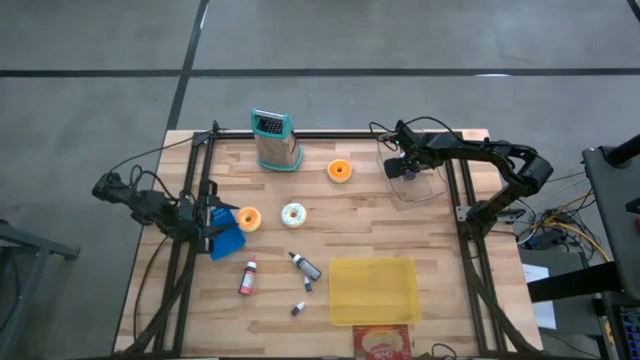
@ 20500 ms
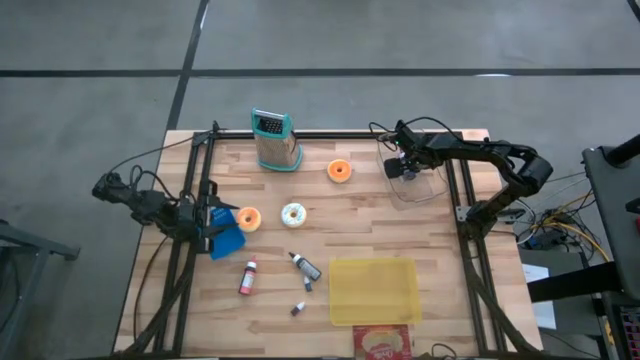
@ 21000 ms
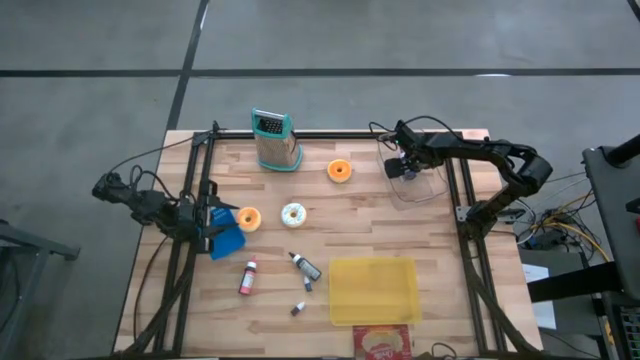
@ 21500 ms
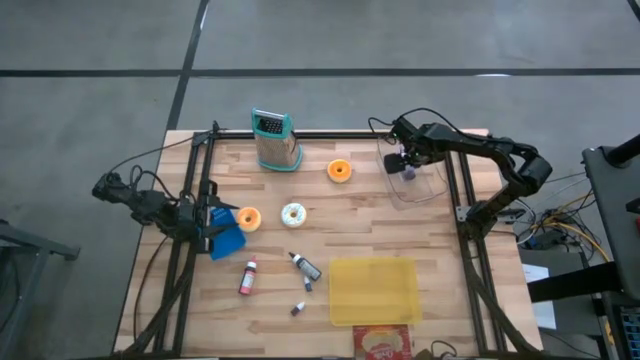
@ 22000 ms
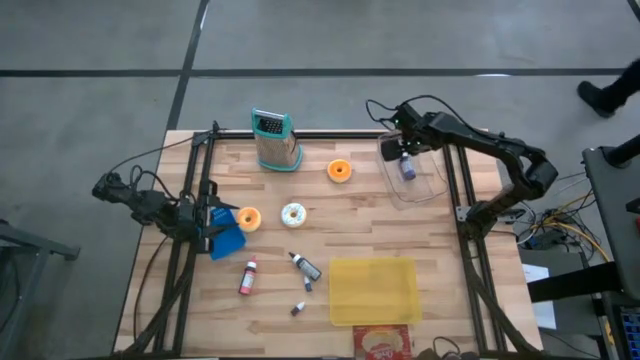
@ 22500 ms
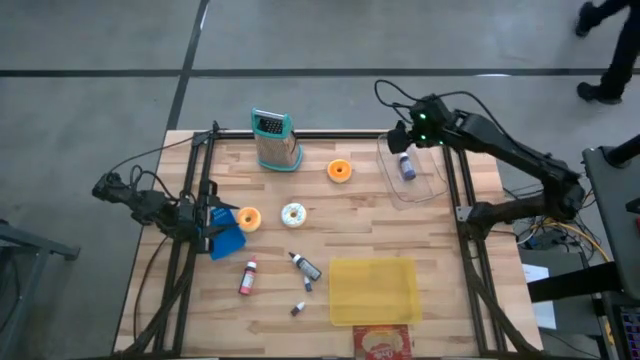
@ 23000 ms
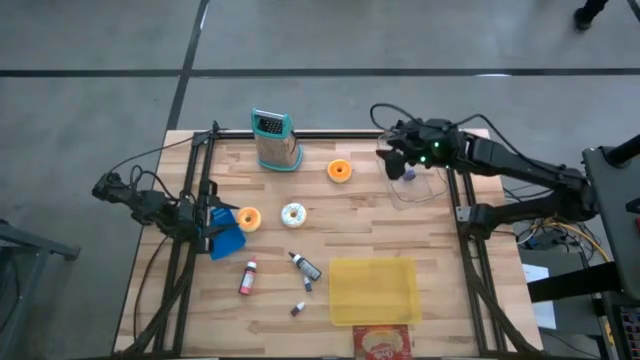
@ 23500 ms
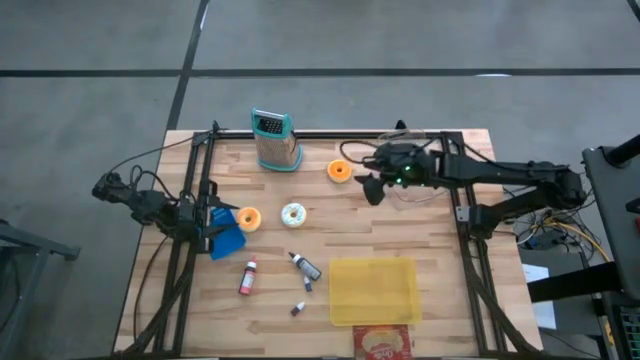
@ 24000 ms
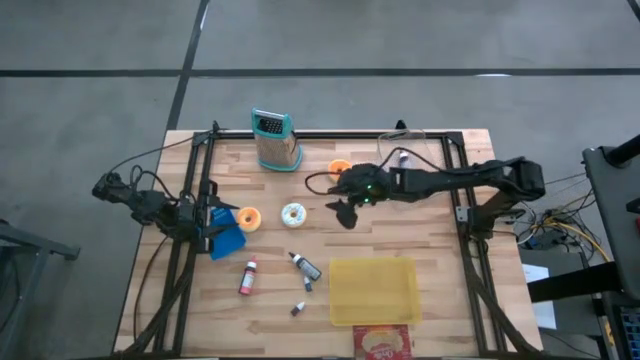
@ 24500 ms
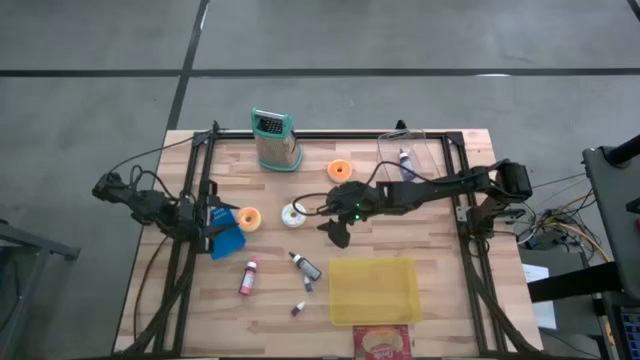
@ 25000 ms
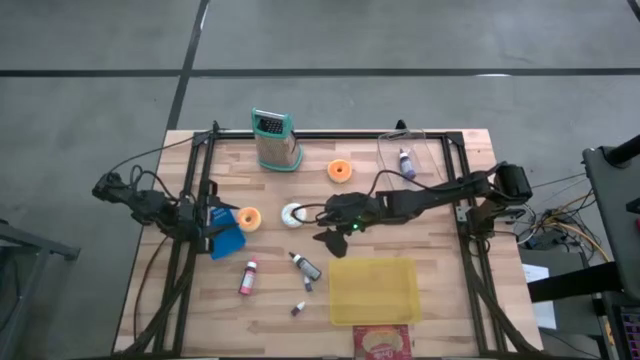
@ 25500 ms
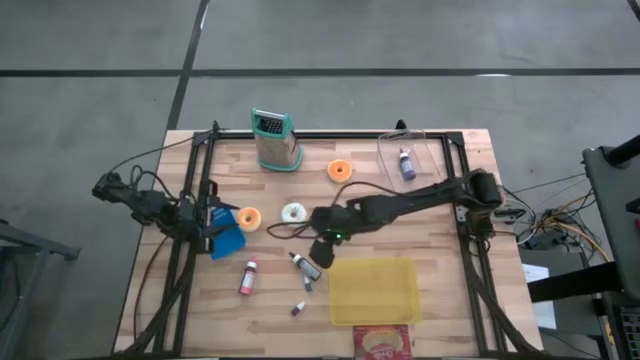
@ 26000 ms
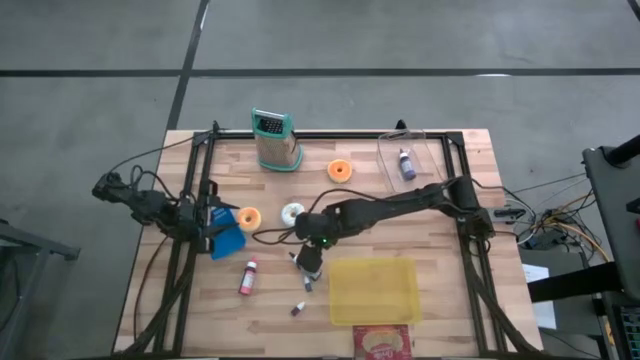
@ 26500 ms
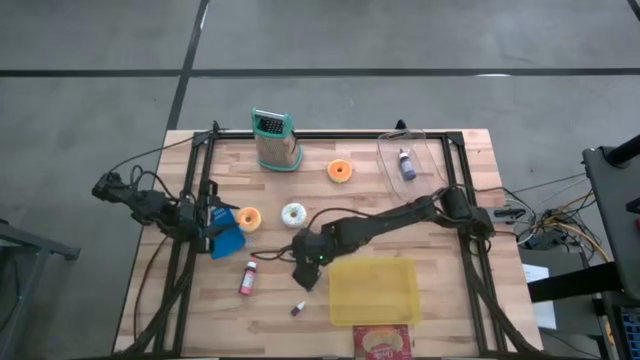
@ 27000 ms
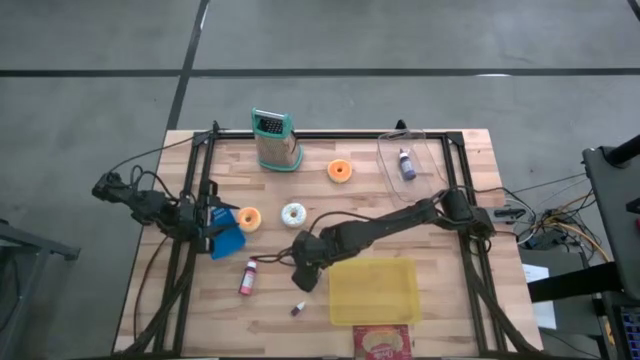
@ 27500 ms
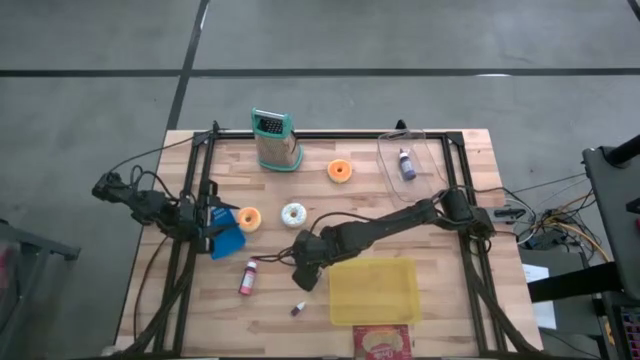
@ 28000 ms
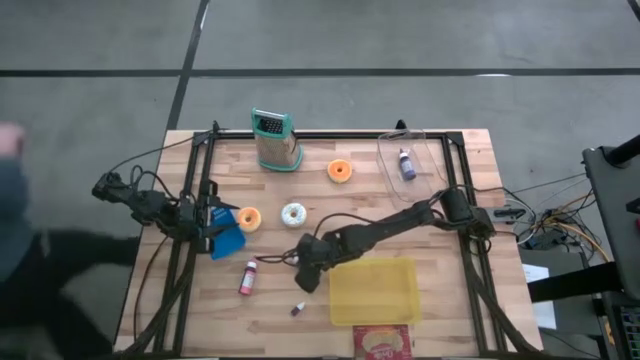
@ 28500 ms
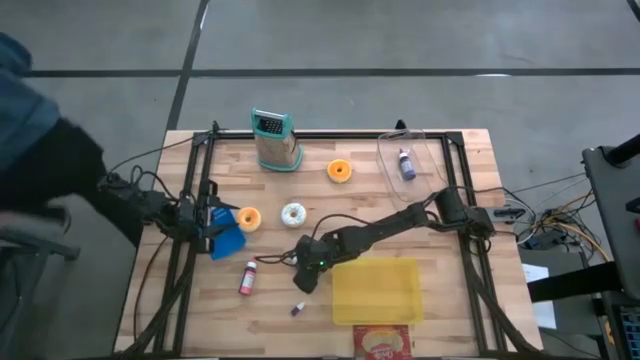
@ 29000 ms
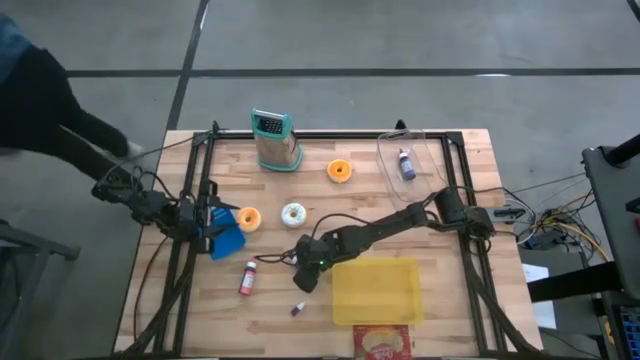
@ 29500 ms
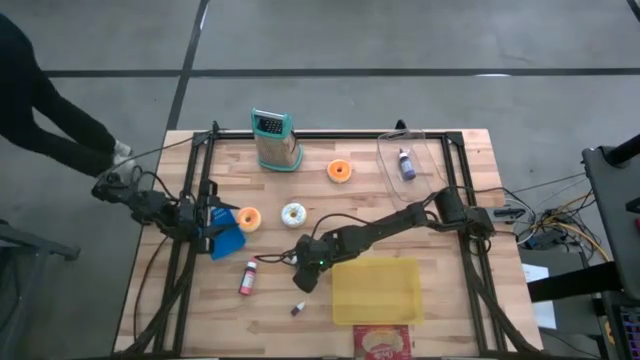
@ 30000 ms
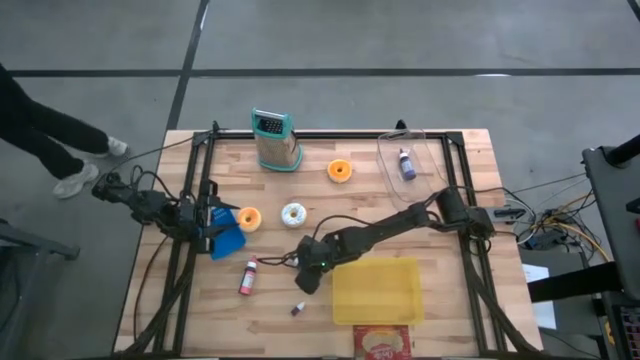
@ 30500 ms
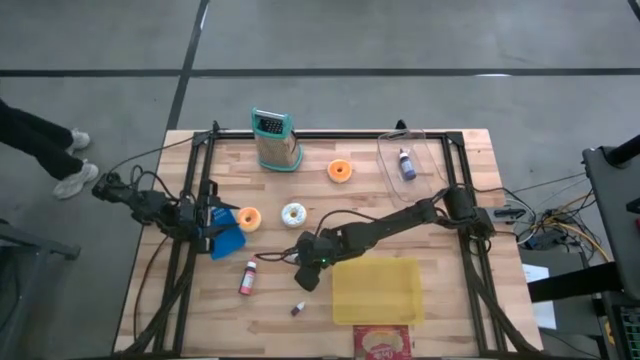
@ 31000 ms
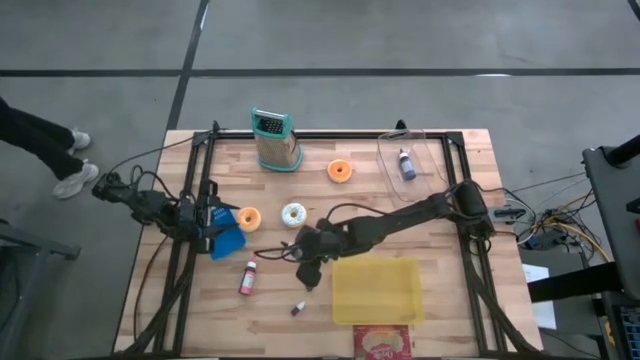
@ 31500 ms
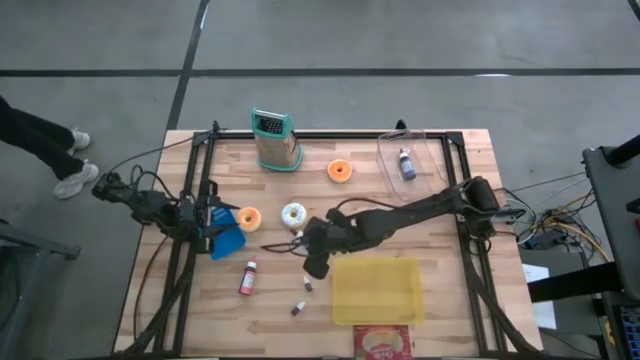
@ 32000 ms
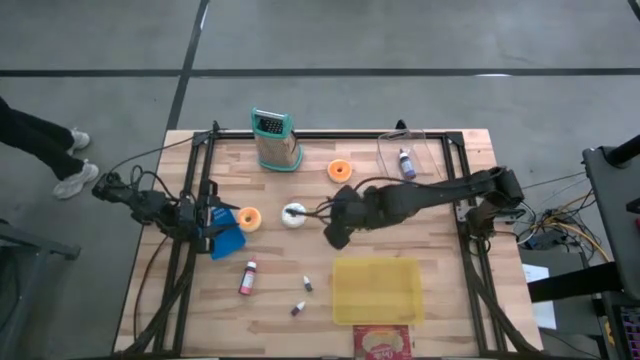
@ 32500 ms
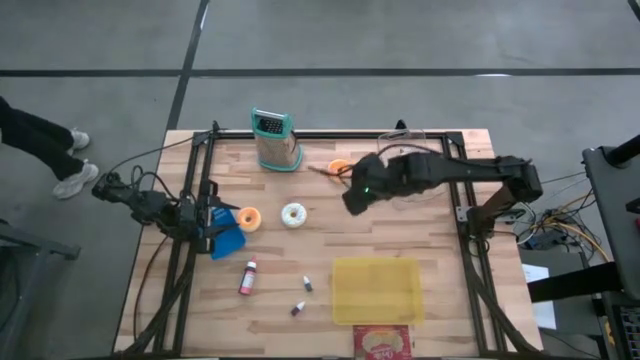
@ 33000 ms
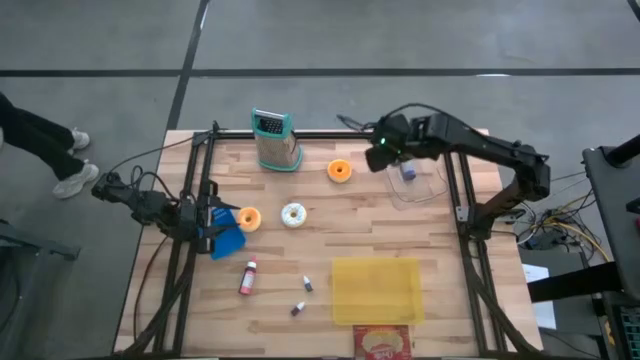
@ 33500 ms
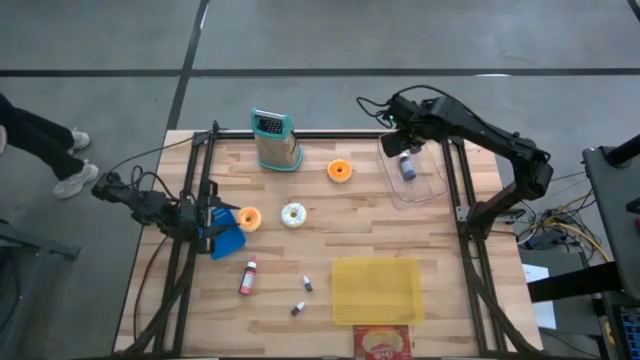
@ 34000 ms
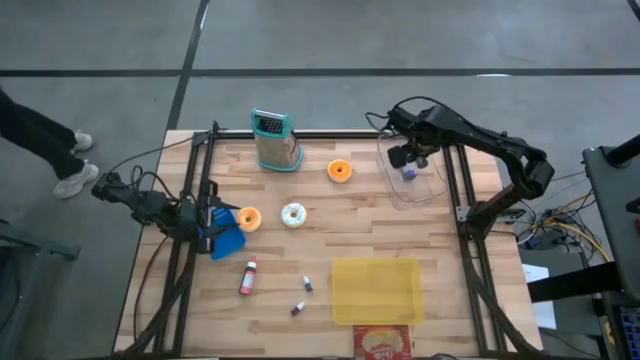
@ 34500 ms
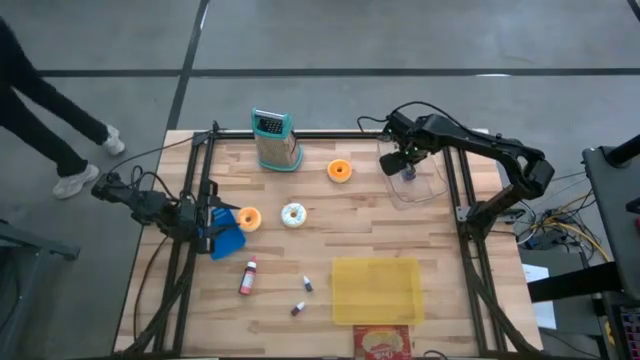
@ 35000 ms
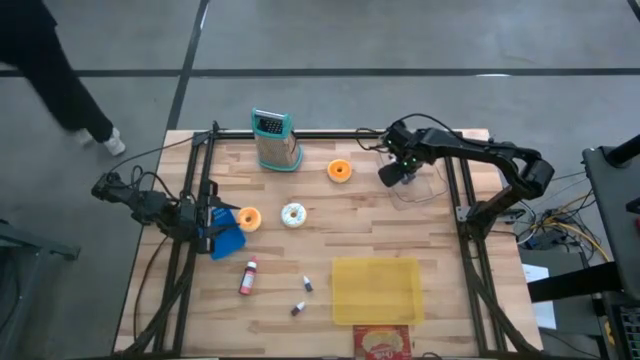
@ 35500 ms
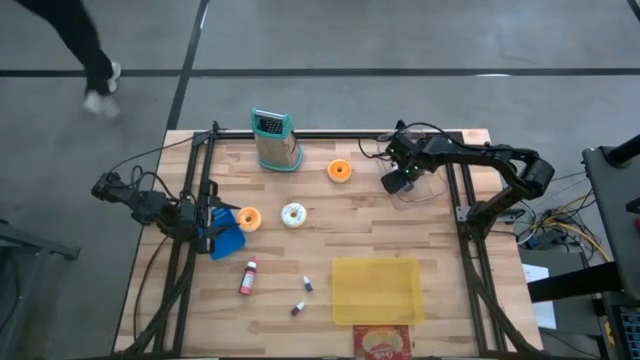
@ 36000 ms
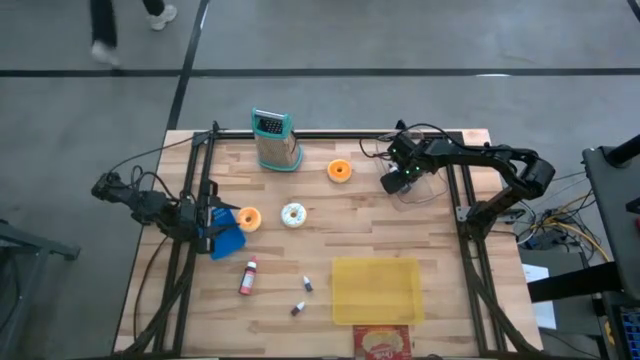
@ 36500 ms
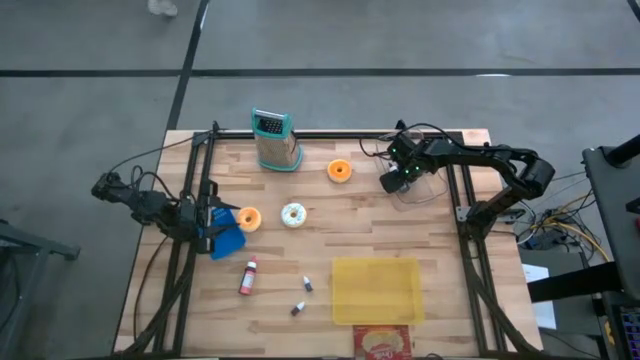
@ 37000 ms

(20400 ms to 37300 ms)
Task: Pick & Place Food Item
Put the black food coloring bottle into the transparent bin

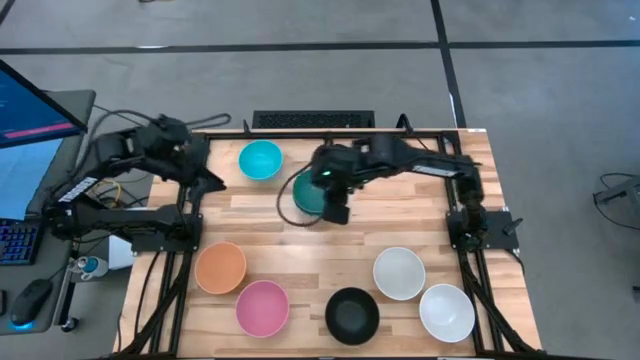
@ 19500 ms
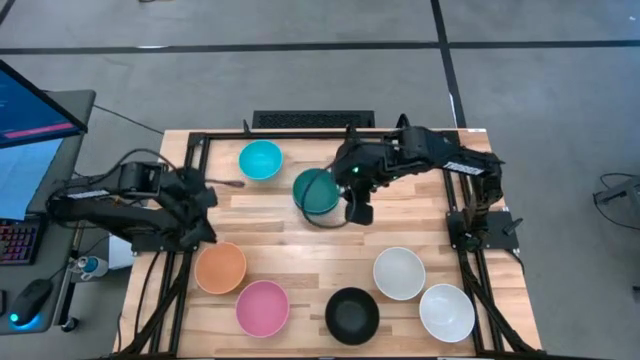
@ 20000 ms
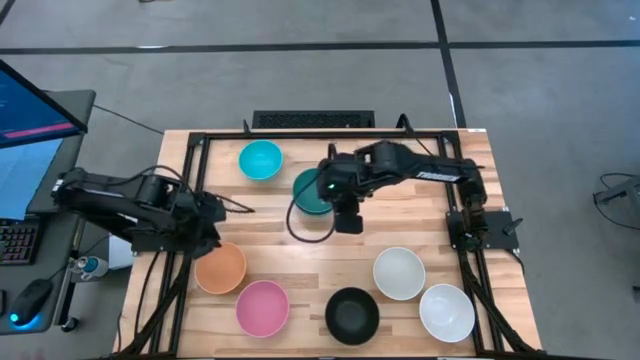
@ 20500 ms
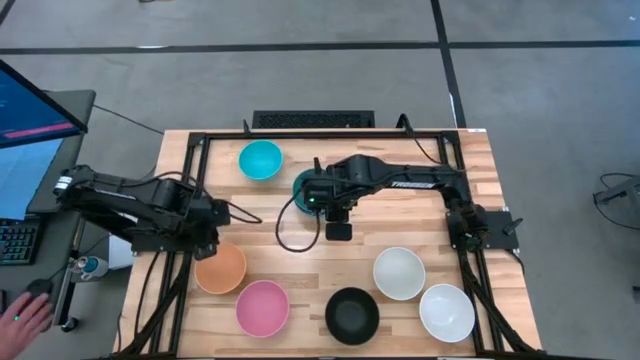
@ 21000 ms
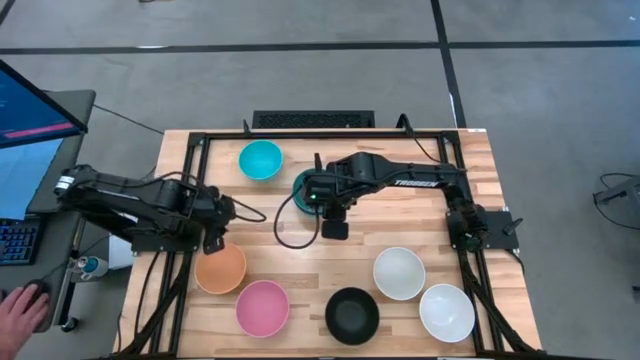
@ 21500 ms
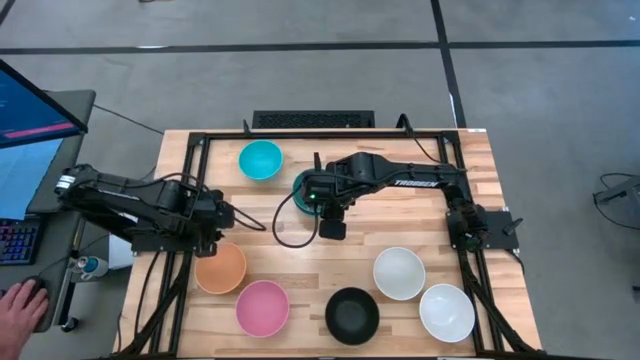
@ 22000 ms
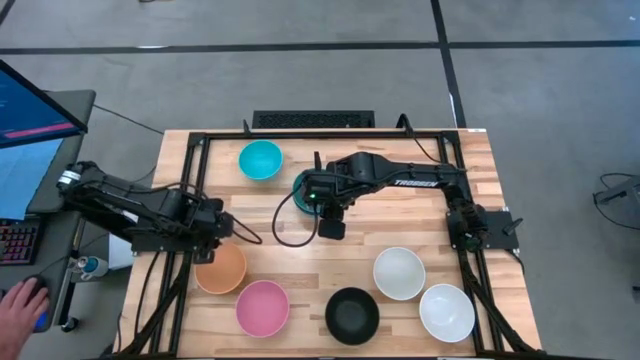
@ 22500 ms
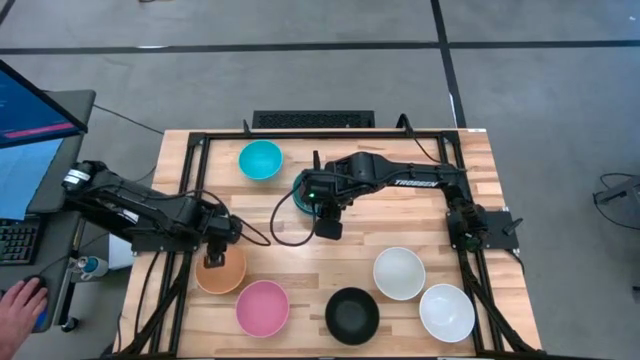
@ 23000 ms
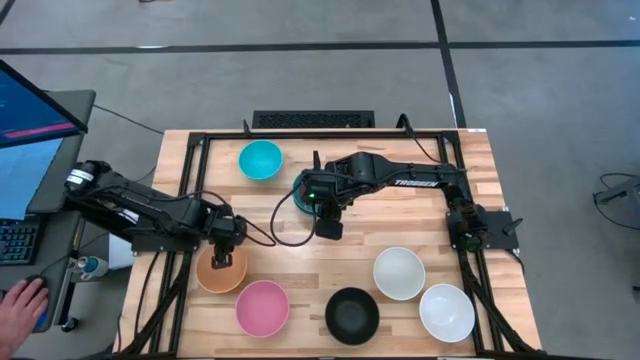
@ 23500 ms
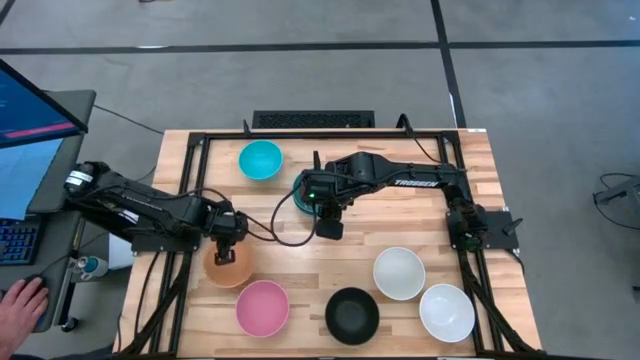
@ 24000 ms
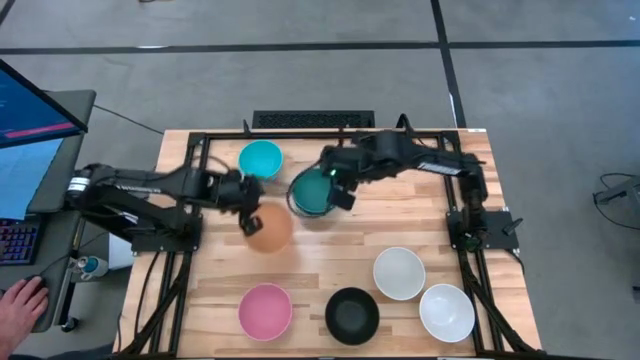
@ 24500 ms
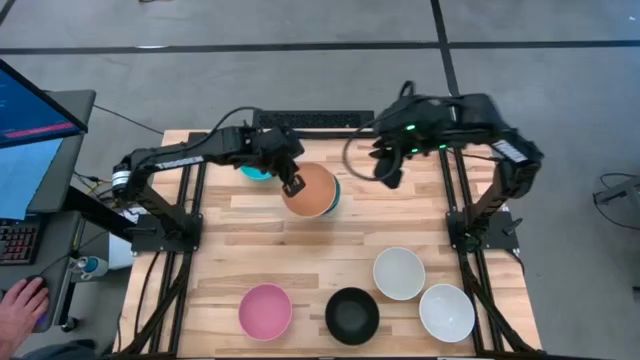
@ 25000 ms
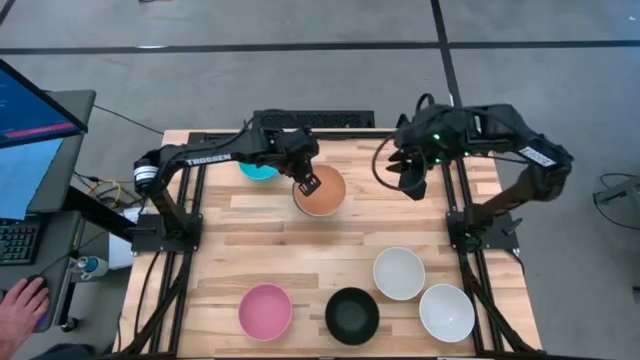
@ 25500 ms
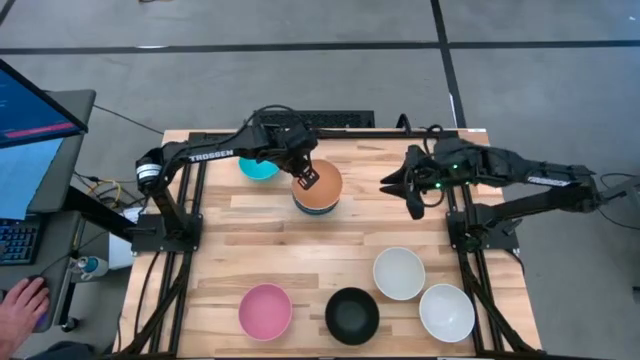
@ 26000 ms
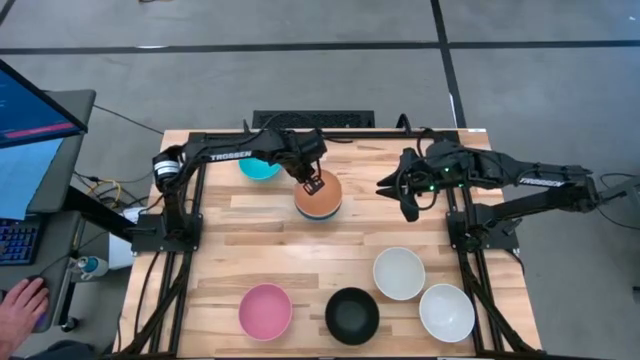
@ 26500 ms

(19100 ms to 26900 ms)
Task: Nest bowls inside each other
Stack the orange bowl on top of the blue bowl
